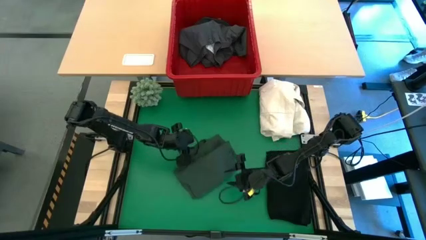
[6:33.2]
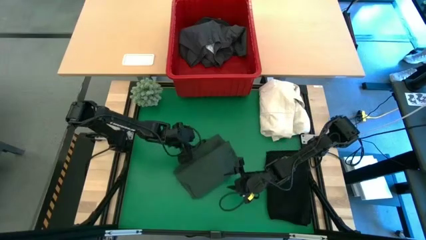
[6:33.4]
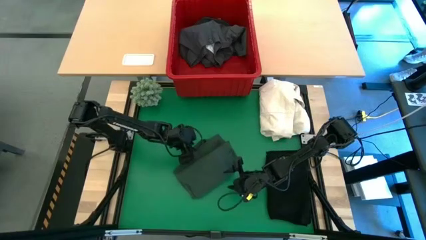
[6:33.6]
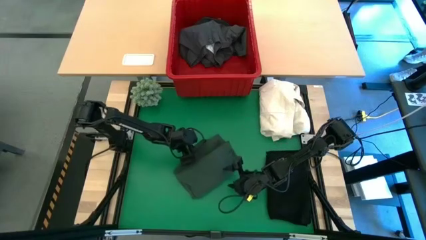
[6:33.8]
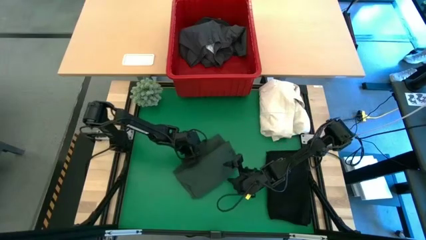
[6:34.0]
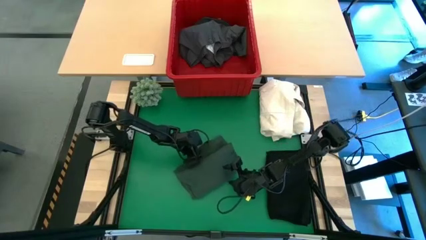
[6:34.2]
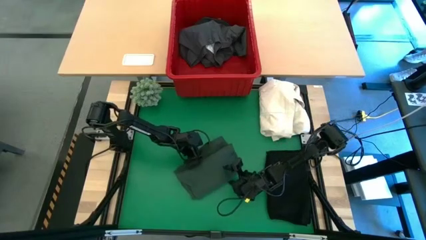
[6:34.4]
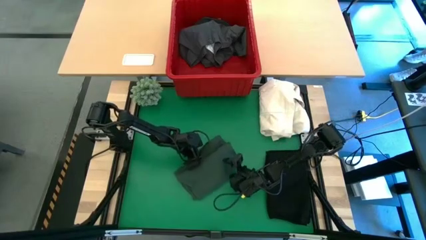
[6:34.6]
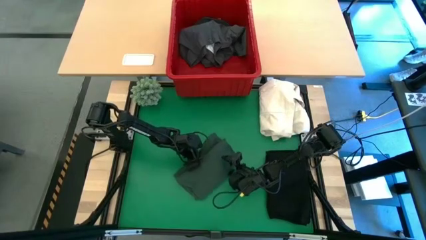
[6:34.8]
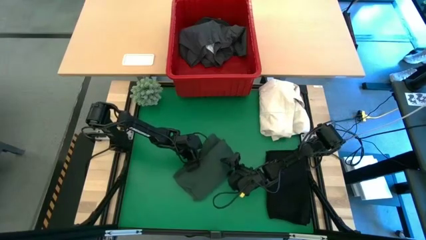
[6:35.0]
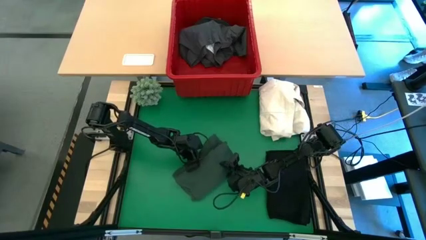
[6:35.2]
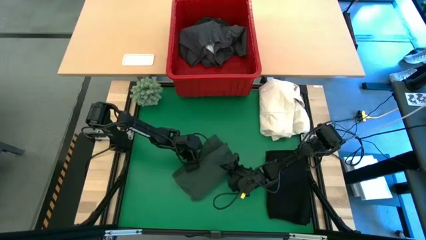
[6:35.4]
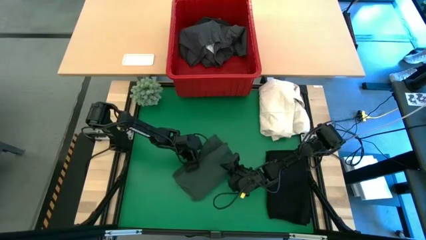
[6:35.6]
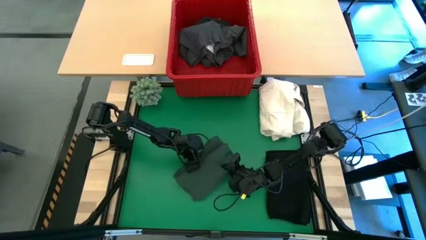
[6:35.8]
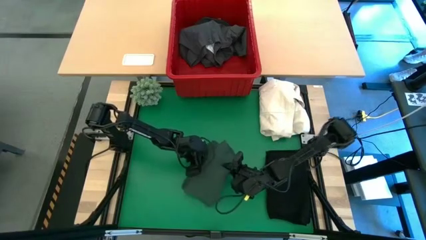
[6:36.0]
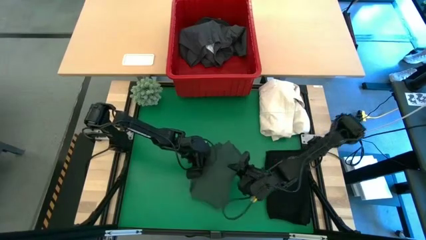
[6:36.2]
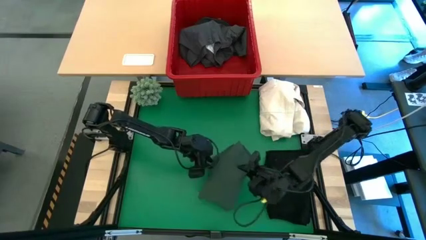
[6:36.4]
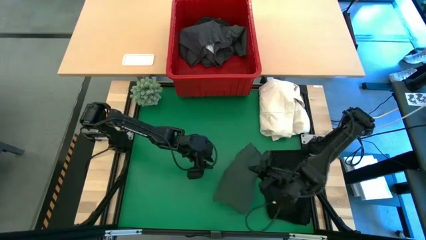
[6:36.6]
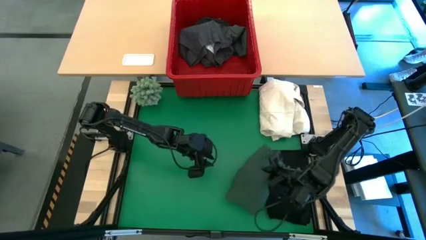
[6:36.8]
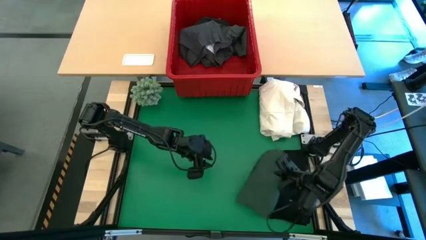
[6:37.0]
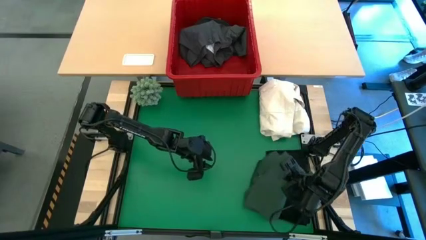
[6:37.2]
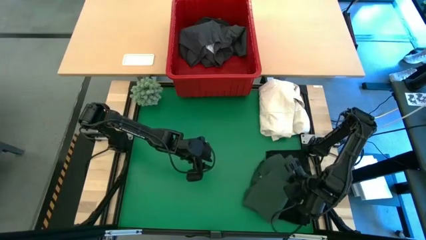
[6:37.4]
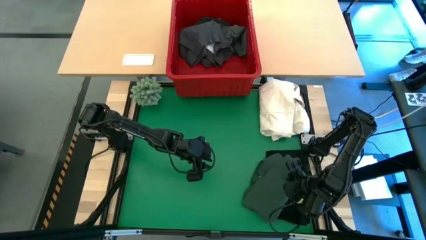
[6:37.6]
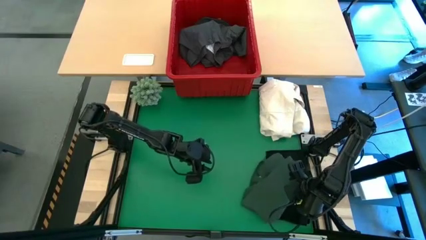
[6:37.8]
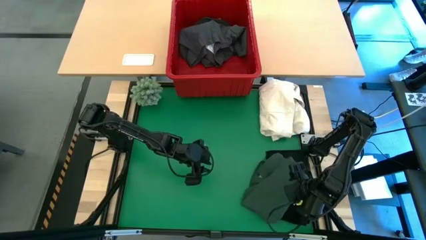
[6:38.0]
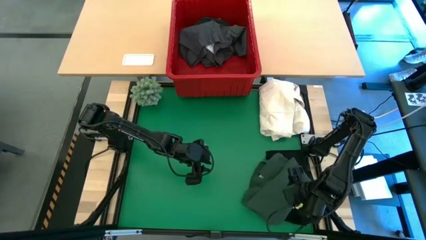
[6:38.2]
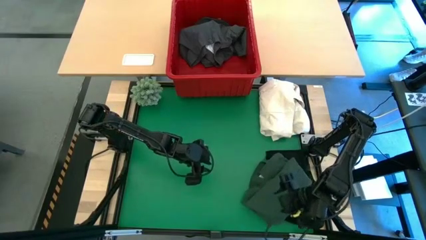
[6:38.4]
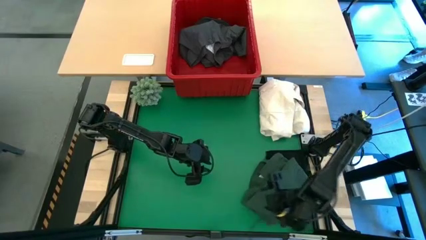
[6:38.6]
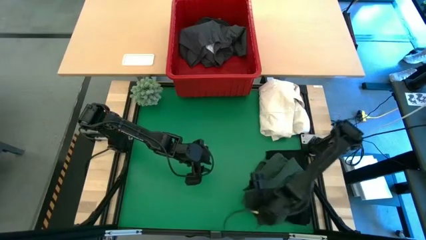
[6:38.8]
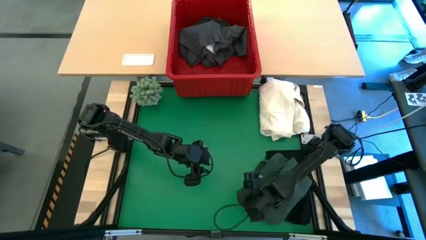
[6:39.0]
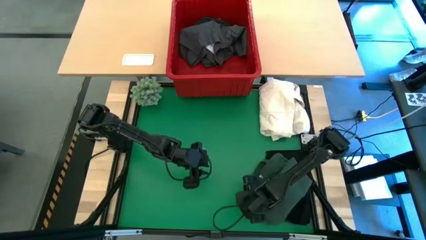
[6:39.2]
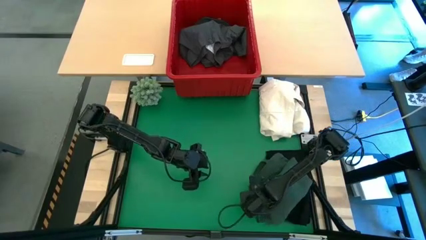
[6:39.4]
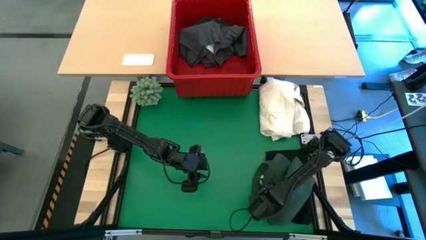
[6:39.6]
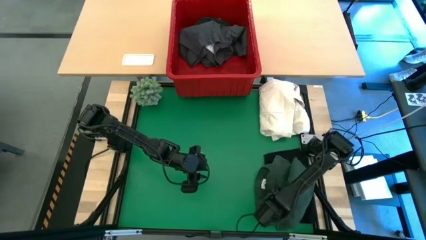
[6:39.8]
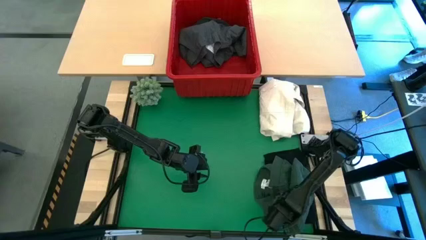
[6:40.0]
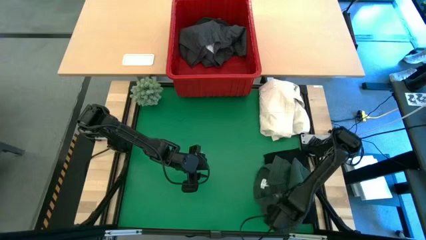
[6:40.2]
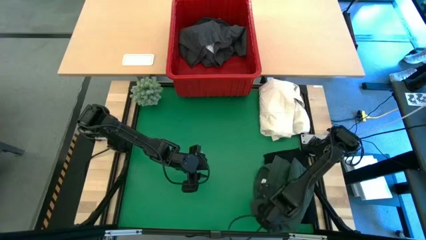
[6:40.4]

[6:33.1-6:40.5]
Task: Fold laundry
Stack the green folded polo shirt on top of the black folded shirt

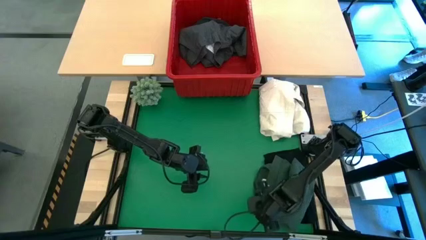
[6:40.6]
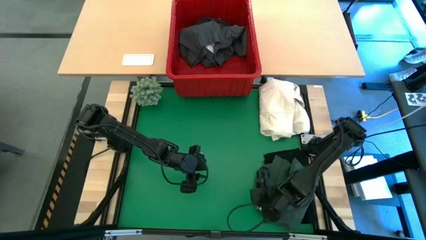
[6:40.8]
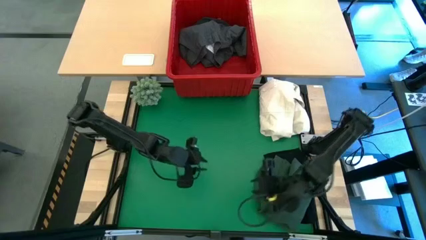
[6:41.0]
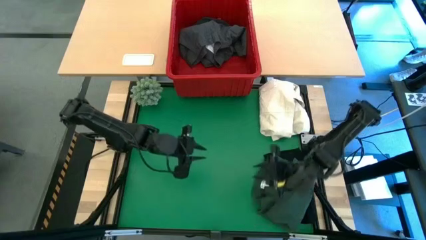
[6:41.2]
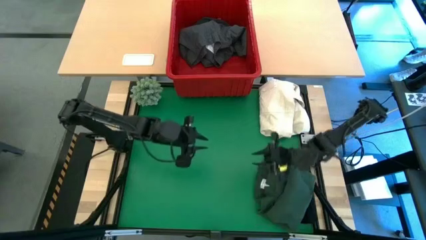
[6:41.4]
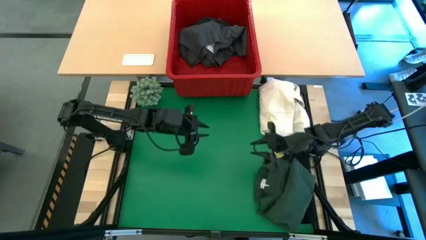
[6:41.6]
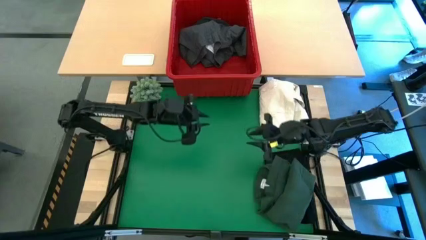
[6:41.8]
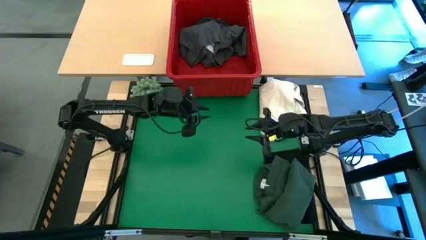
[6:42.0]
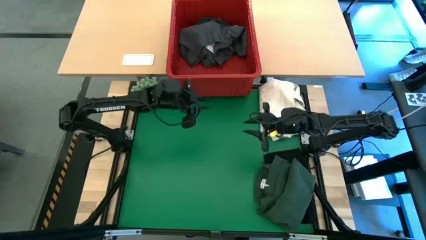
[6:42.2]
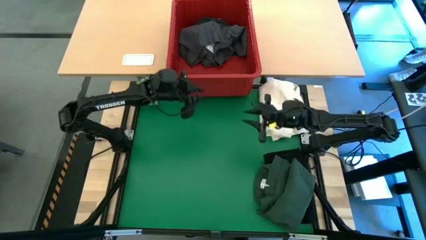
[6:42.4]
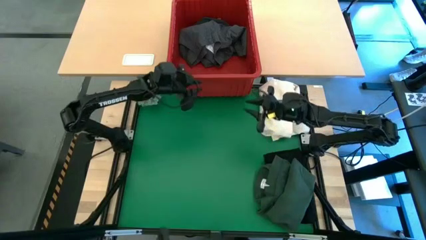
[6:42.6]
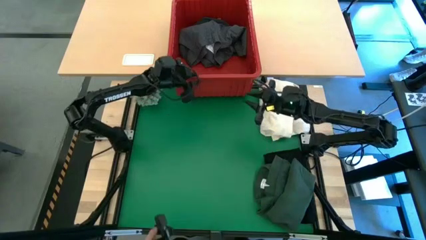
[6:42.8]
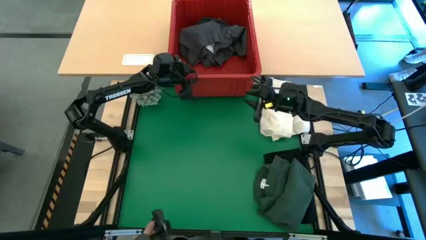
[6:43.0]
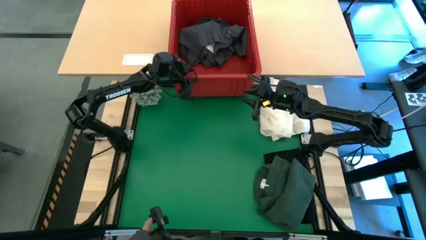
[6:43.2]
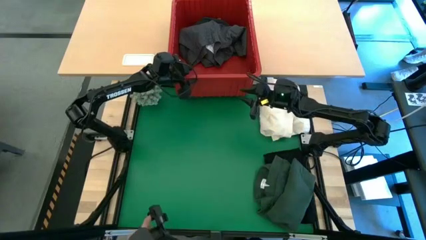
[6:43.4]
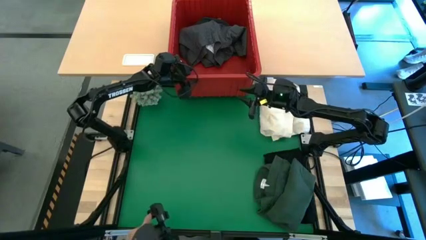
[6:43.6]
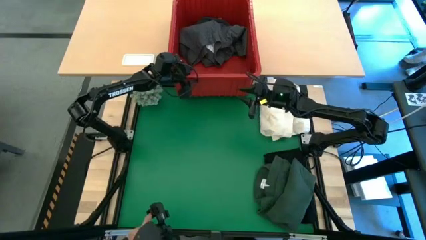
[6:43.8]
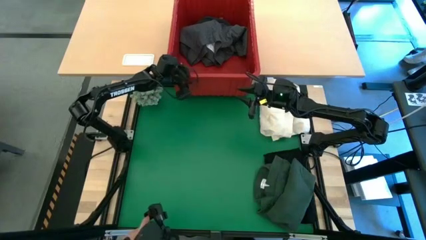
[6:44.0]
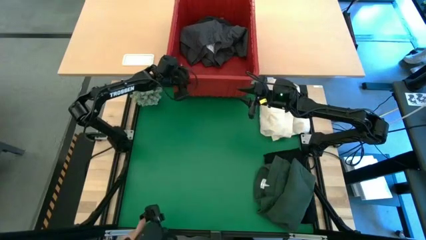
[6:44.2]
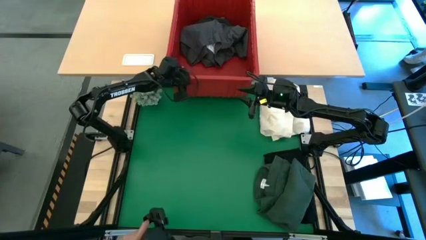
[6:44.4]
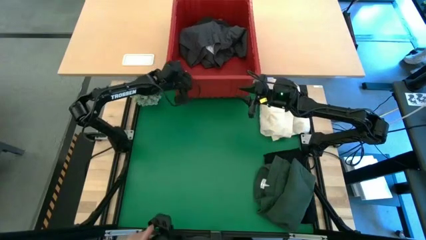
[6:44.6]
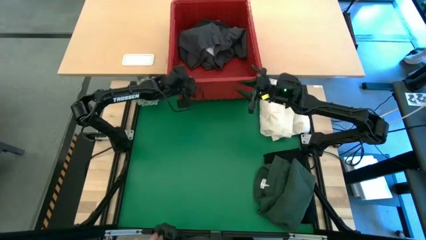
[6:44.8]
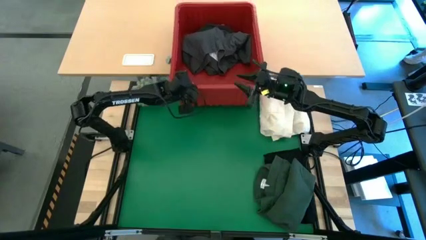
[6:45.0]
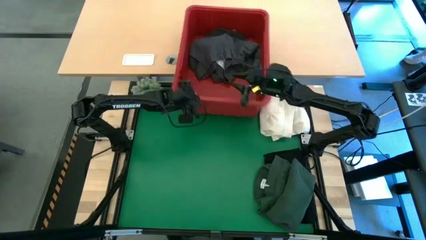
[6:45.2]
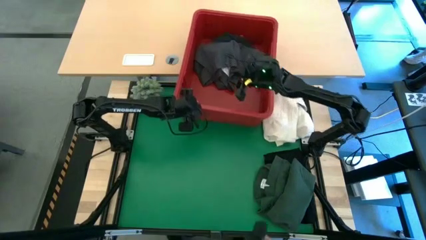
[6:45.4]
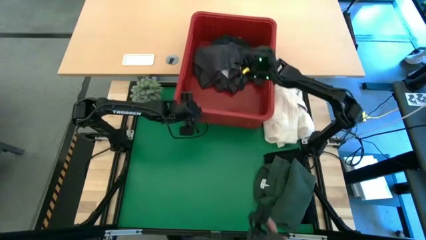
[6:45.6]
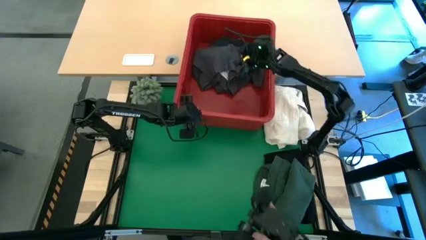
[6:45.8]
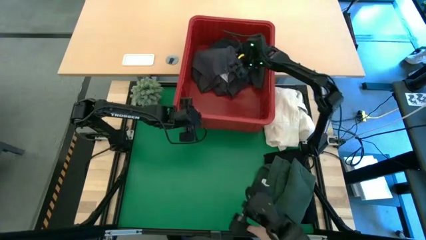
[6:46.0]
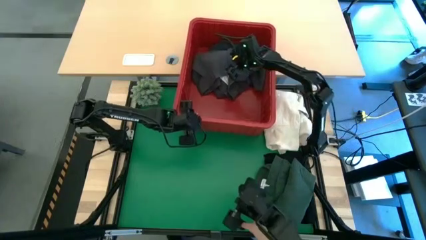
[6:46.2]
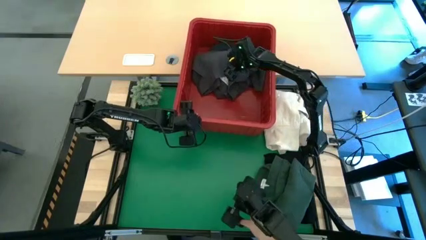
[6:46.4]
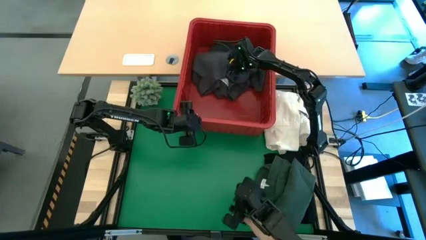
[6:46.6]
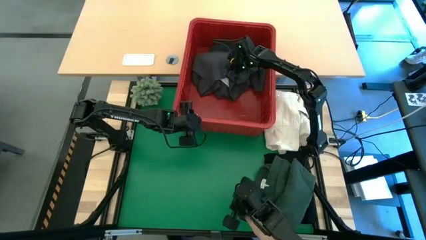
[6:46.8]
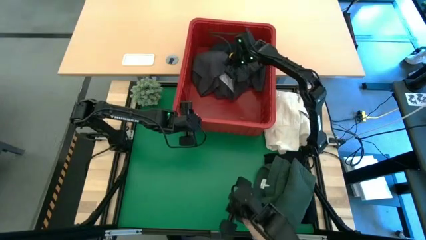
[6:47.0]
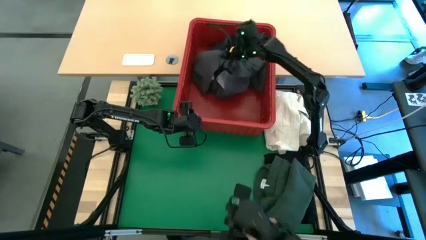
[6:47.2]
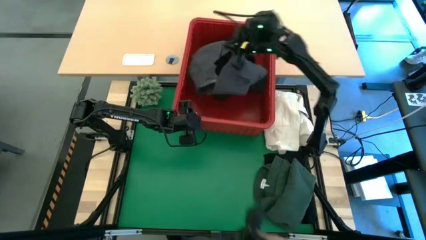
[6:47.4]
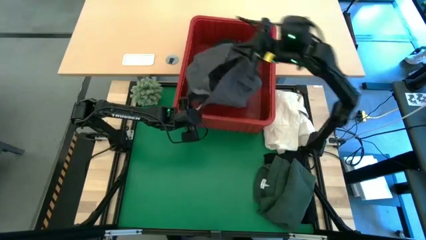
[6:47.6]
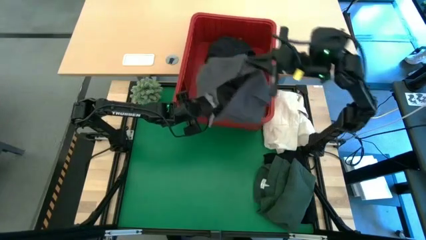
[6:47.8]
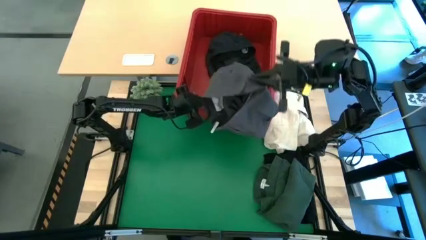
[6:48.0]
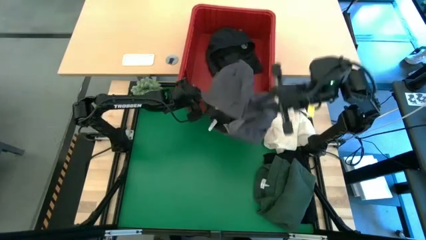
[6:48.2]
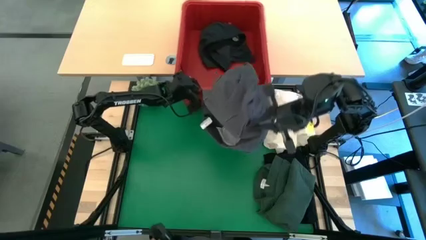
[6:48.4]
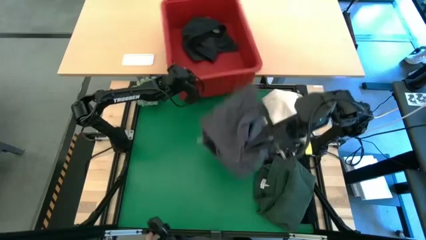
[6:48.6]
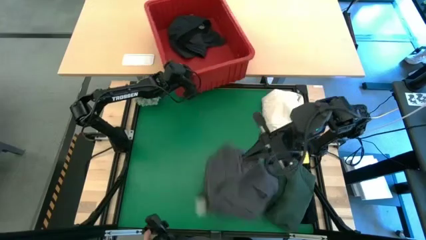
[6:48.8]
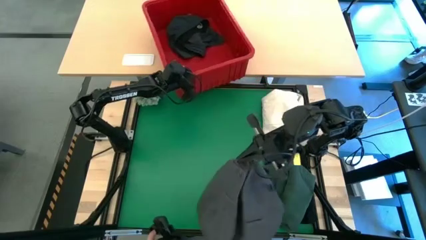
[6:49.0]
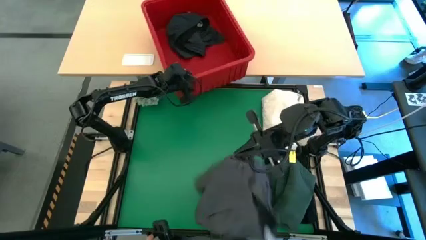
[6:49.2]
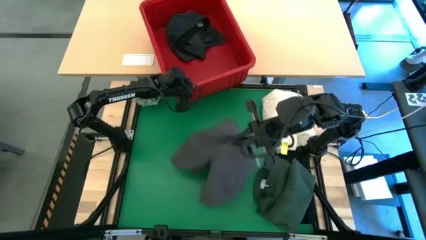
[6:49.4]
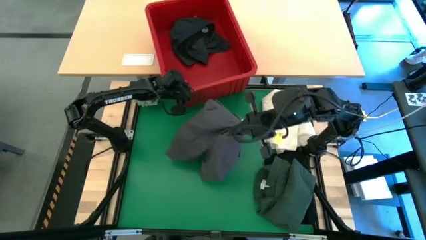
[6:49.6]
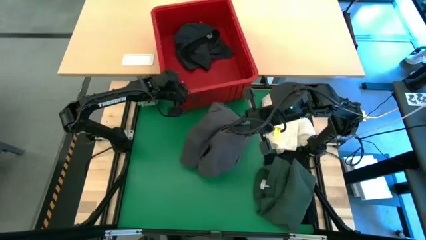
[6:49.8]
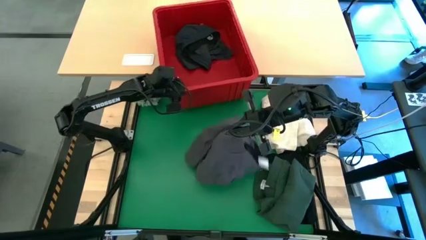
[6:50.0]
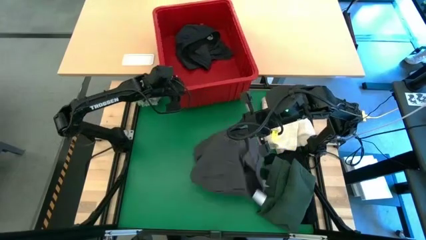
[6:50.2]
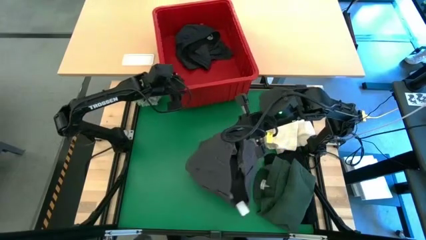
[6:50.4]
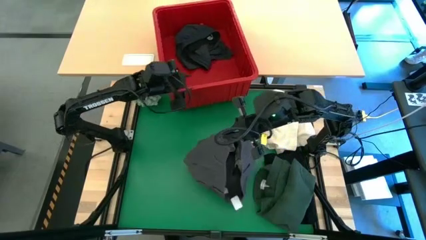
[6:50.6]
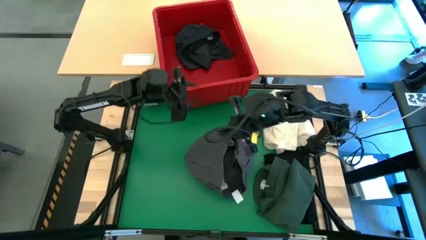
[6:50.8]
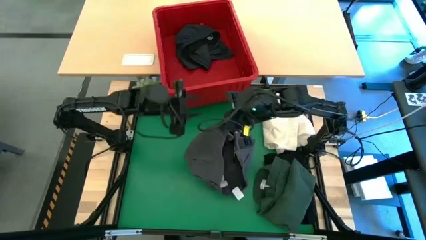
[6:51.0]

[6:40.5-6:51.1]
Fold the gray pants
